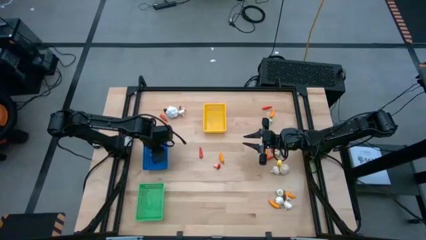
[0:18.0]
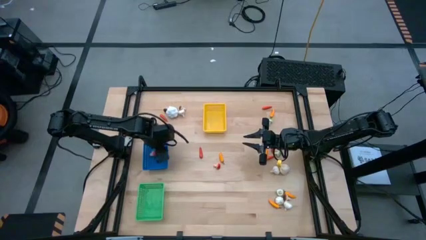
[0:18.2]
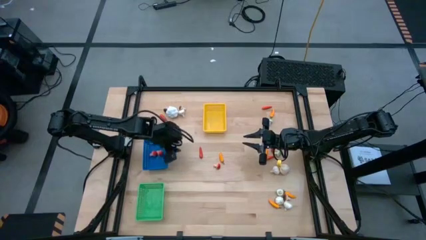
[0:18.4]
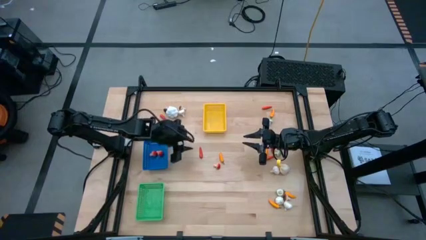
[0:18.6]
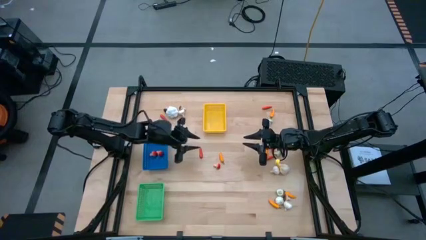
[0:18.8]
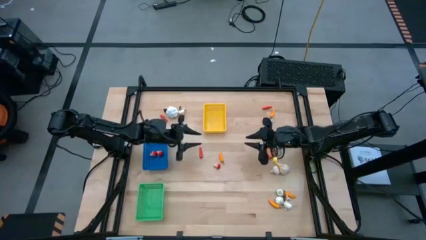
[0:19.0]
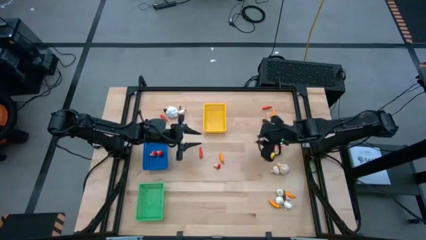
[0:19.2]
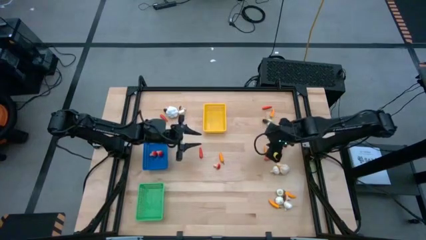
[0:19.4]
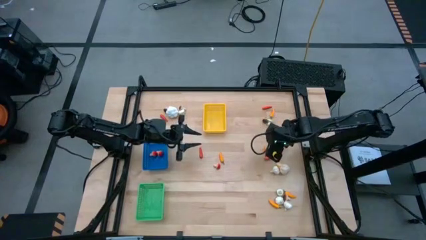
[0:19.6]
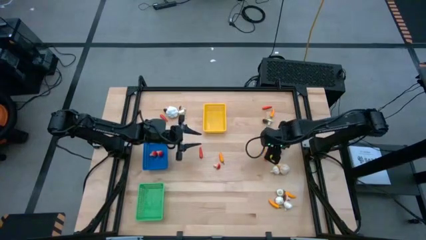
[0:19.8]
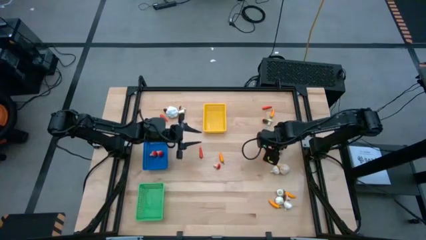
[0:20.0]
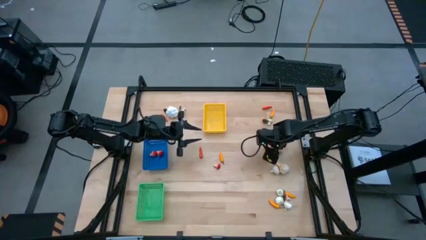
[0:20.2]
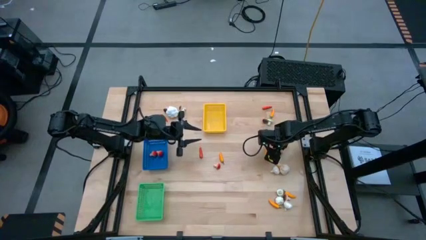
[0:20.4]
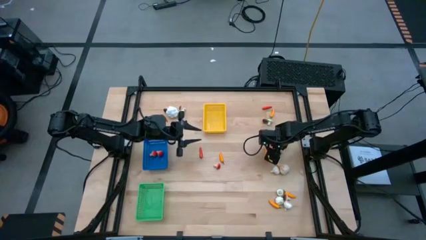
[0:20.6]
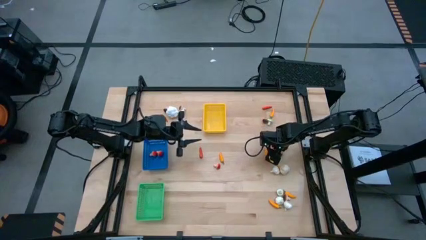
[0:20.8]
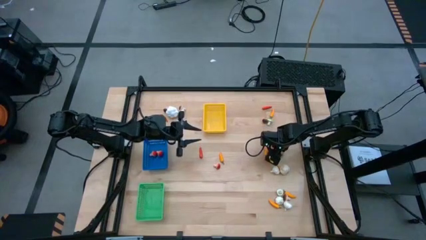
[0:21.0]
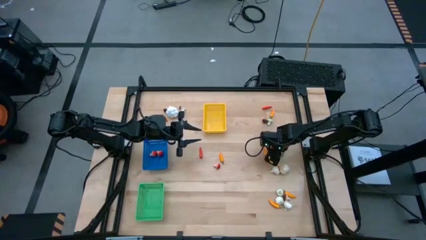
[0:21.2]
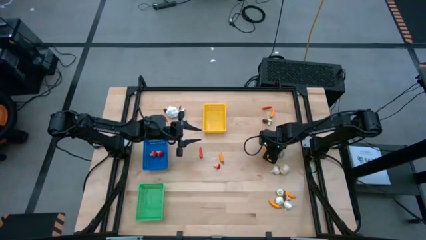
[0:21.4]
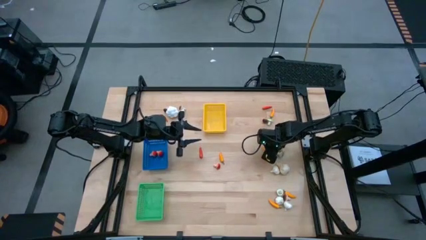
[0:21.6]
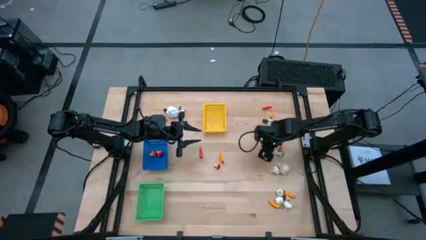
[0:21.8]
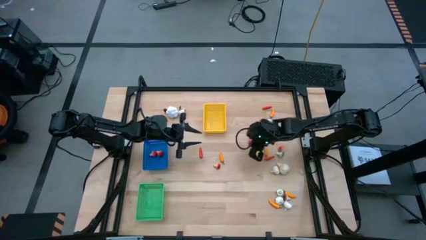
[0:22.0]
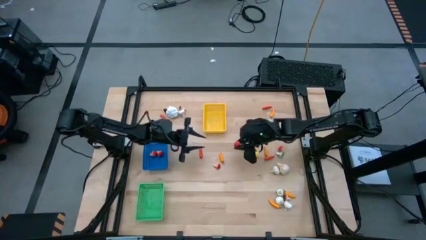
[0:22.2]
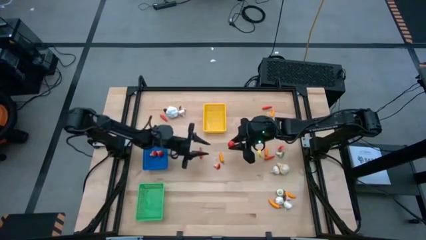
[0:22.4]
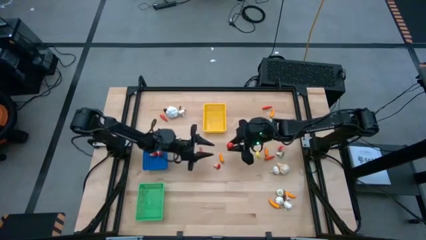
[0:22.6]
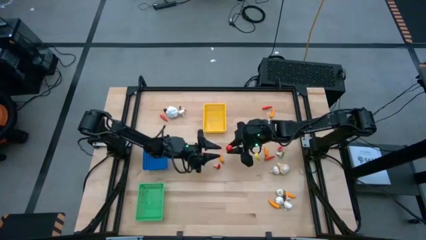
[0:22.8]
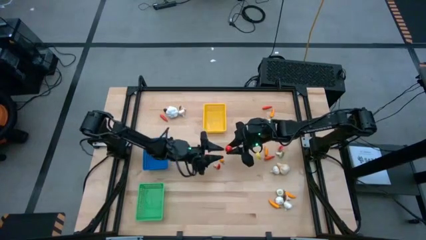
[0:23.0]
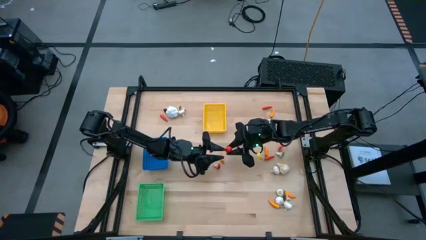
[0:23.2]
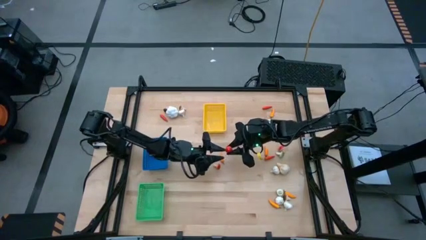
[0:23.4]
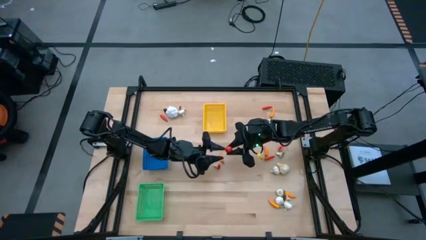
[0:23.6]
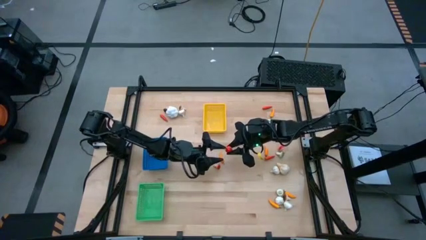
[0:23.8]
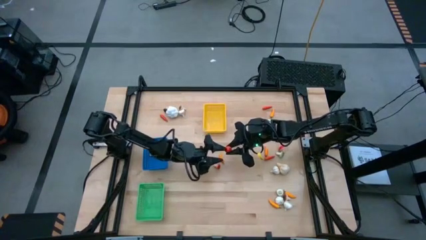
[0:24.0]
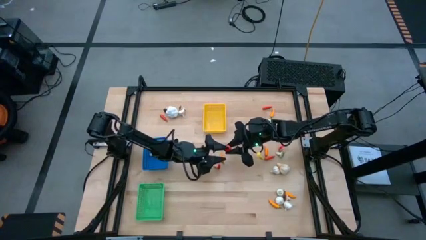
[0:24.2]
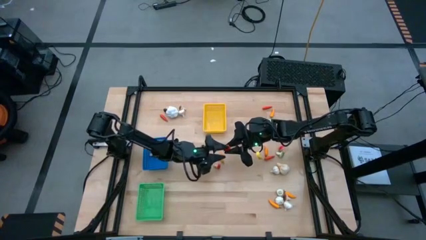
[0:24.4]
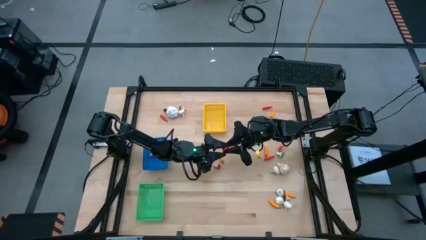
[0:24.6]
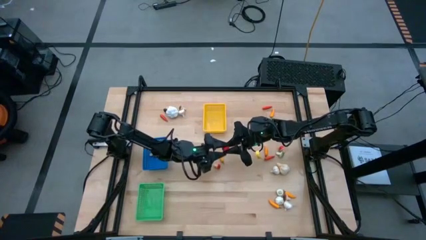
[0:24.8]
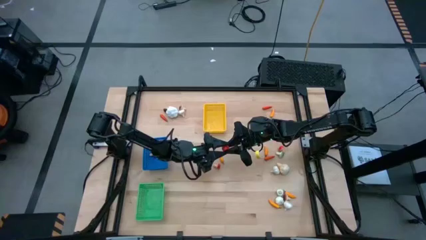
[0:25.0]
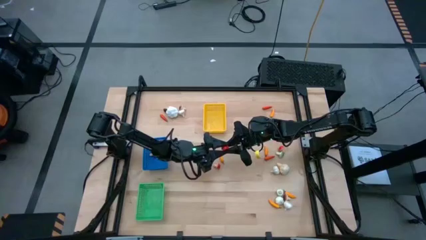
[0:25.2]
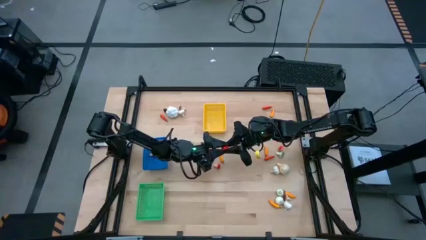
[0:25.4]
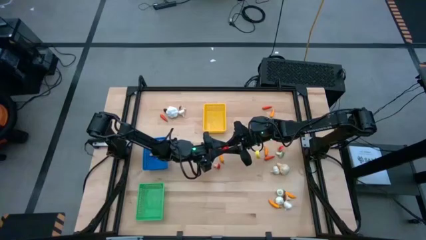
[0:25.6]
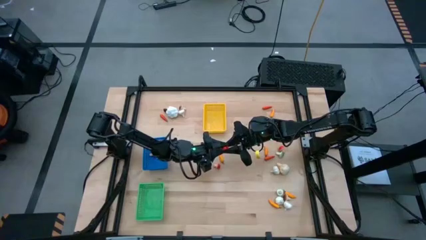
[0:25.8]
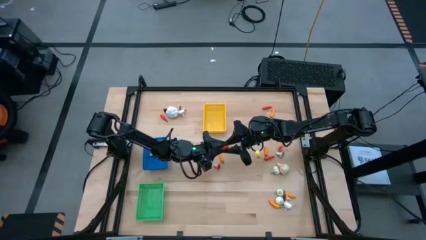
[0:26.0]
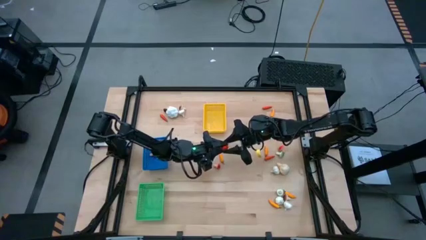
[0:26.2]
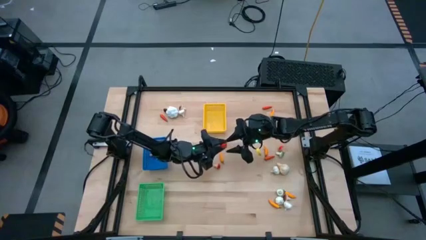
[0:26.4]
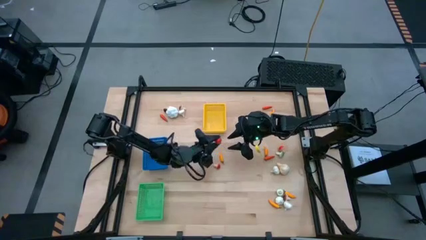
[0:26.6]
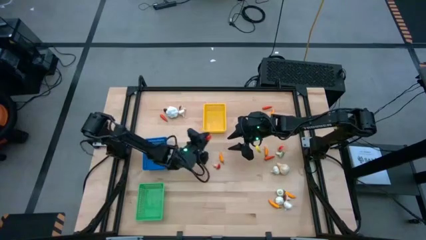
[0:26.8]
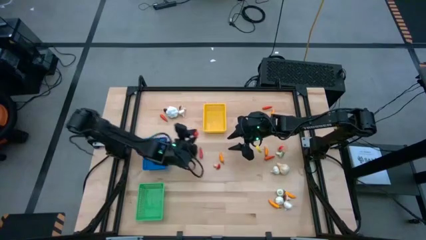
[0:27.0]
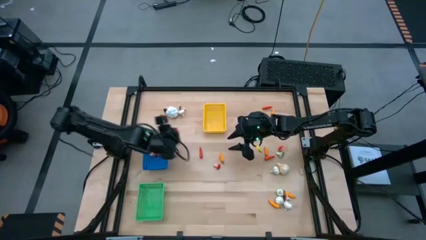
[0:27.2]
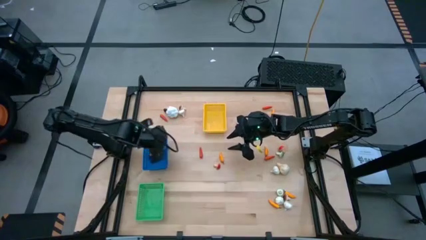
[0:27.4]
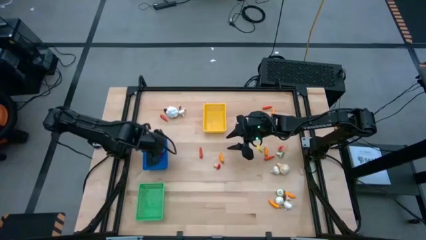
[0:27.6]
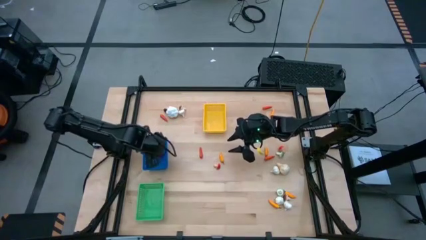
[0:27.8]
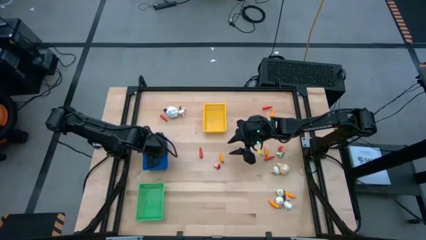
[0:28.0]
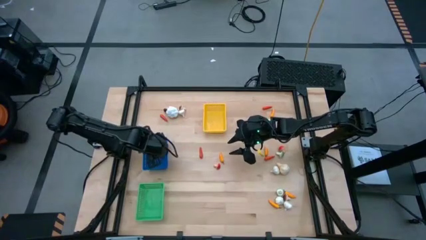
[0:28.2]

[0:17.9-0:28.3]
Task: Sort produce into baskets
Put the orange mushroom into the blue bin
